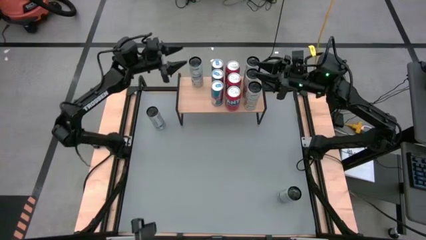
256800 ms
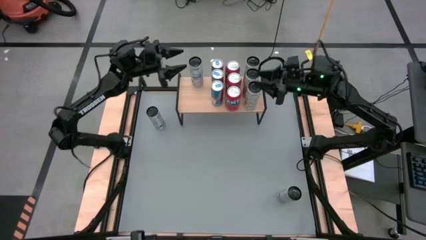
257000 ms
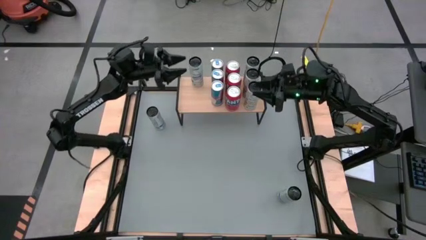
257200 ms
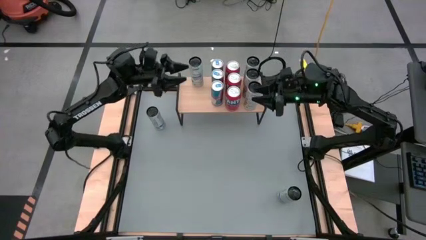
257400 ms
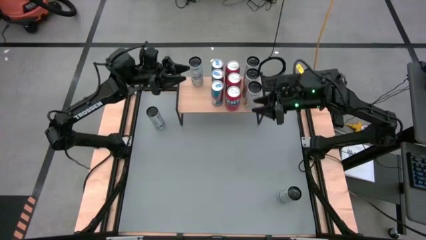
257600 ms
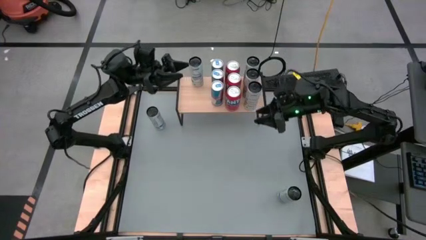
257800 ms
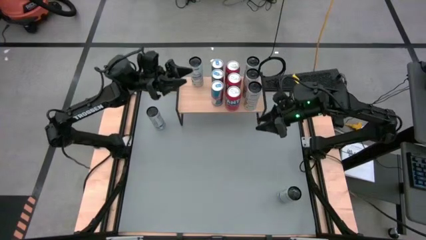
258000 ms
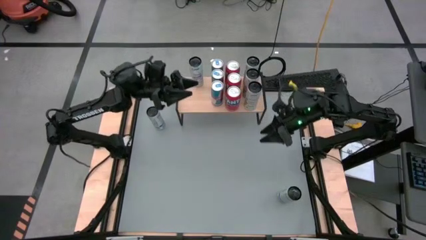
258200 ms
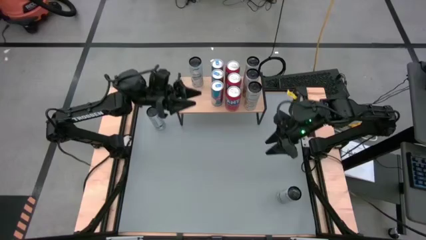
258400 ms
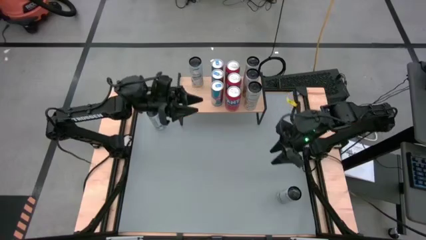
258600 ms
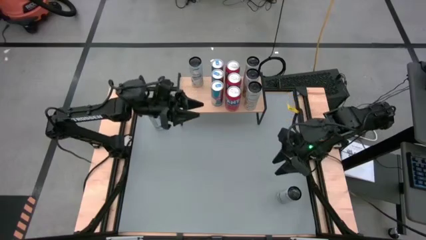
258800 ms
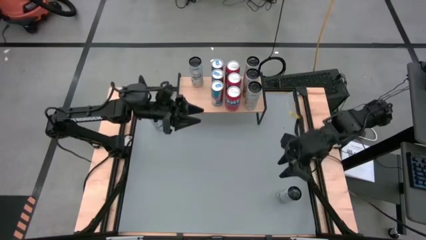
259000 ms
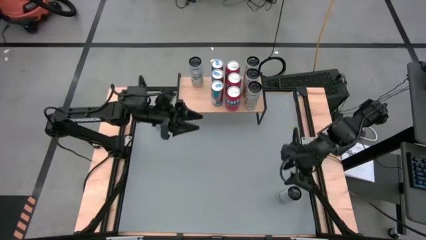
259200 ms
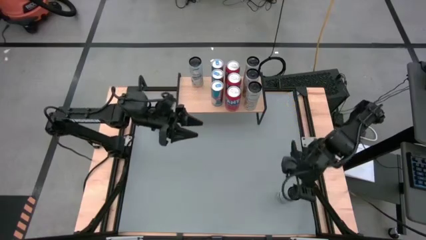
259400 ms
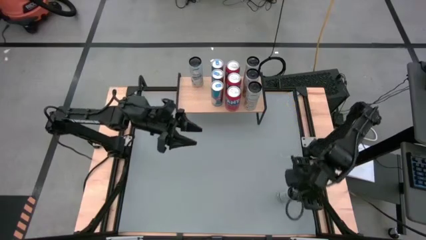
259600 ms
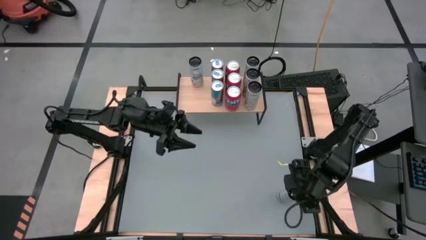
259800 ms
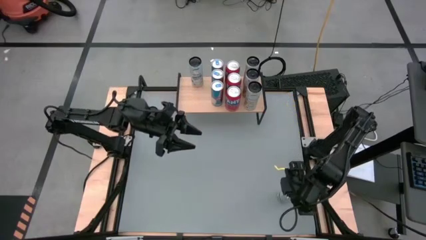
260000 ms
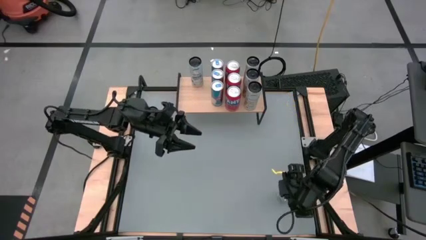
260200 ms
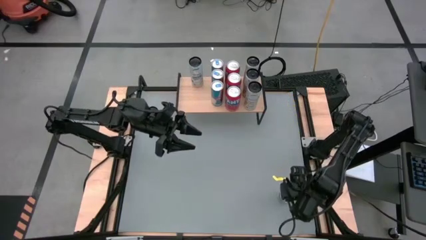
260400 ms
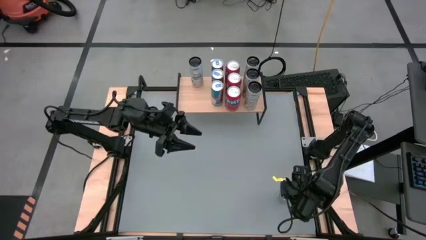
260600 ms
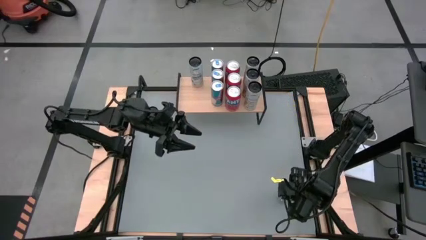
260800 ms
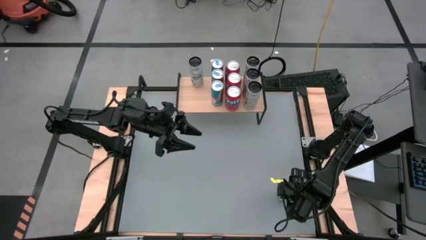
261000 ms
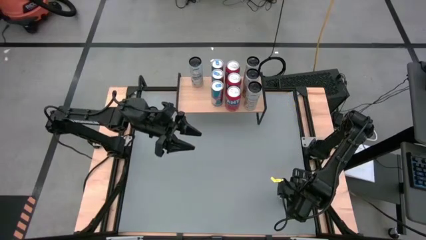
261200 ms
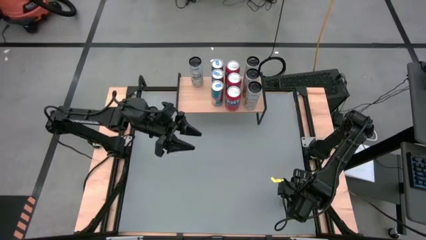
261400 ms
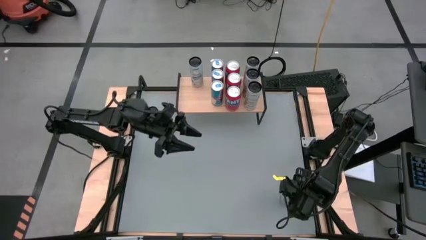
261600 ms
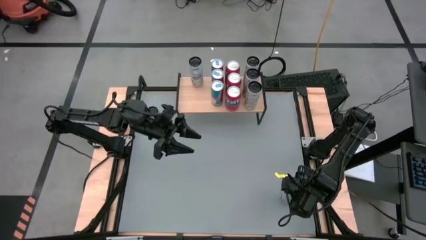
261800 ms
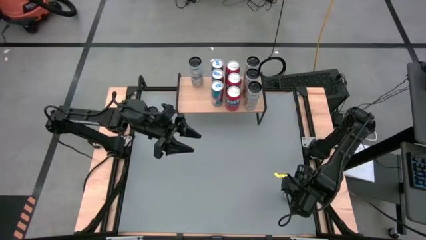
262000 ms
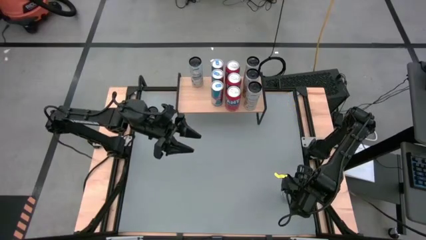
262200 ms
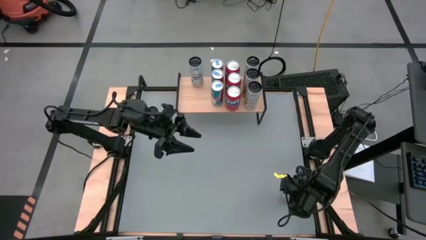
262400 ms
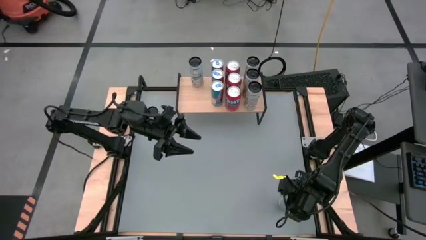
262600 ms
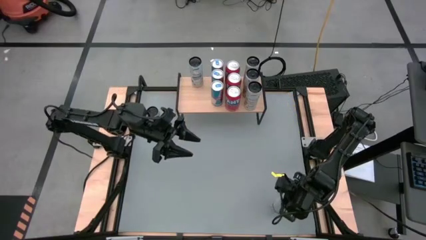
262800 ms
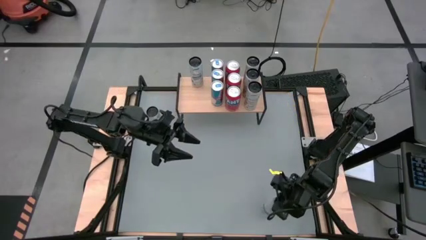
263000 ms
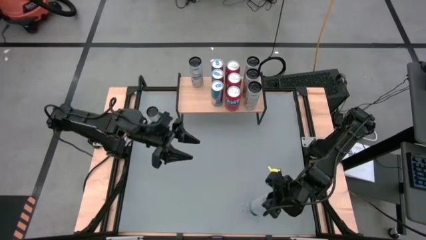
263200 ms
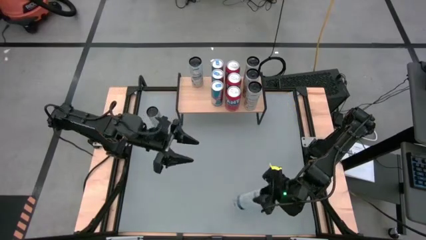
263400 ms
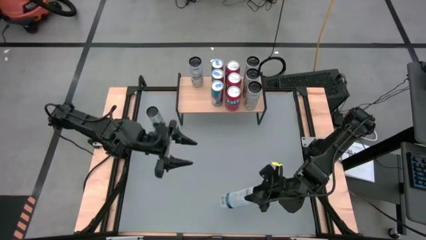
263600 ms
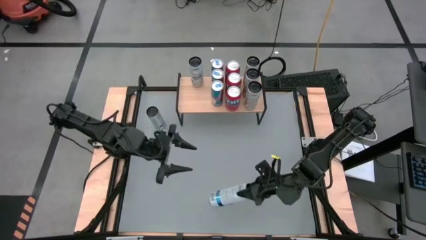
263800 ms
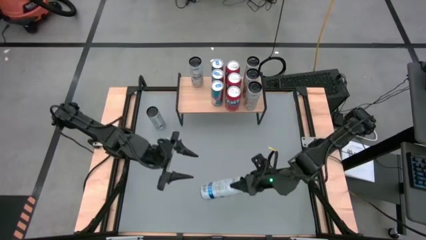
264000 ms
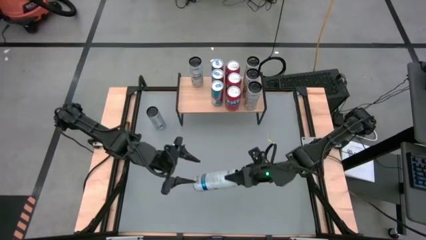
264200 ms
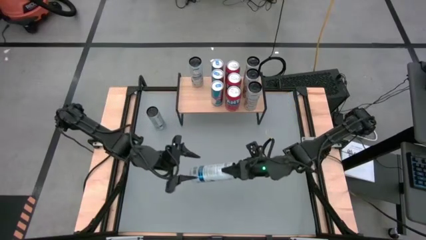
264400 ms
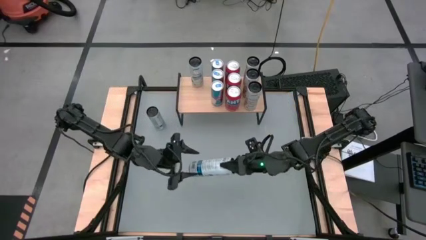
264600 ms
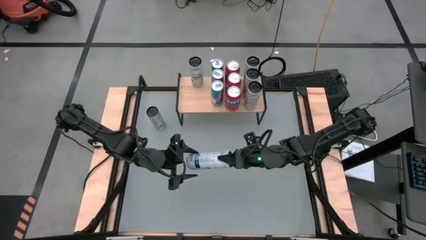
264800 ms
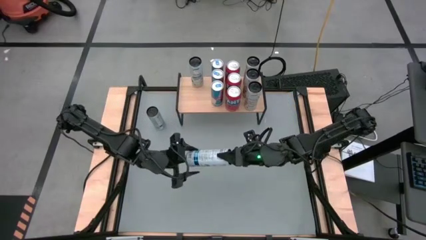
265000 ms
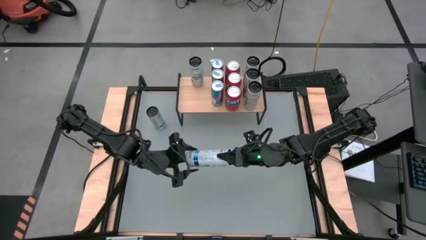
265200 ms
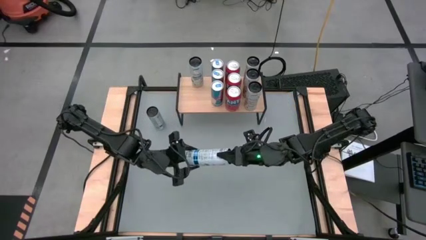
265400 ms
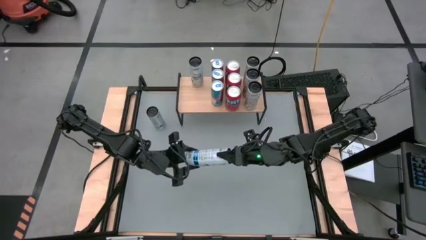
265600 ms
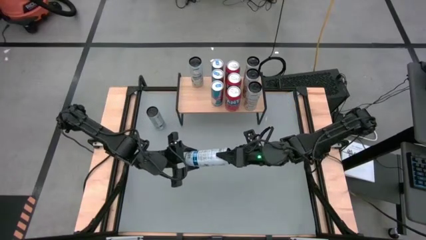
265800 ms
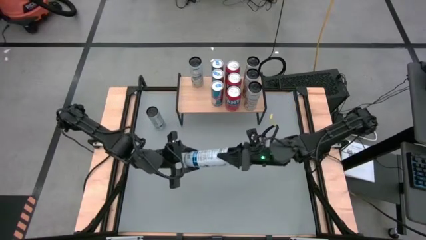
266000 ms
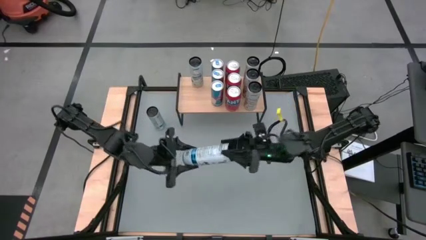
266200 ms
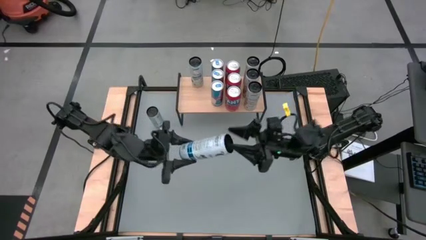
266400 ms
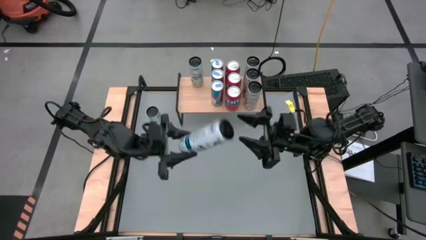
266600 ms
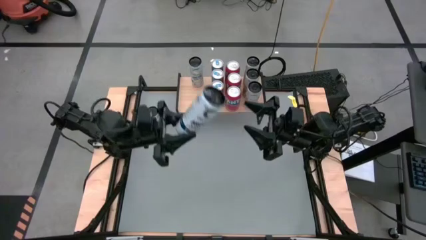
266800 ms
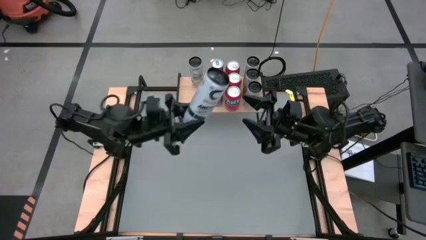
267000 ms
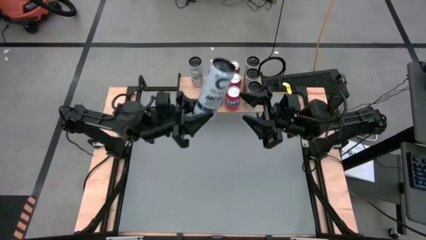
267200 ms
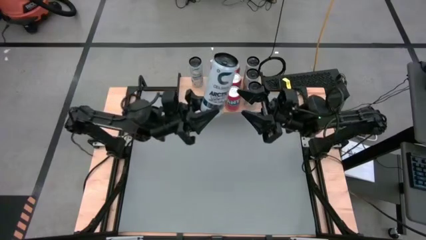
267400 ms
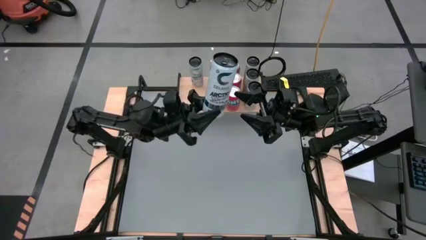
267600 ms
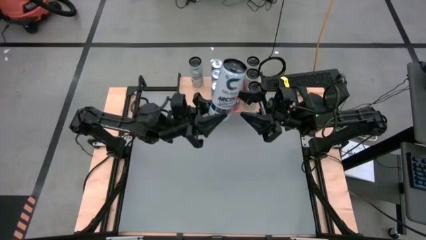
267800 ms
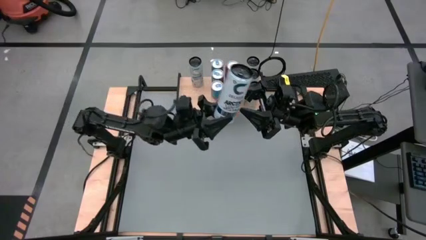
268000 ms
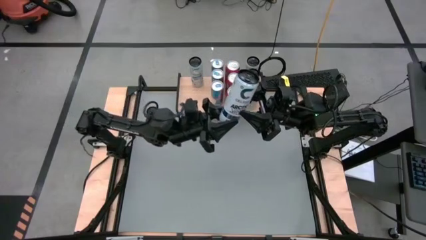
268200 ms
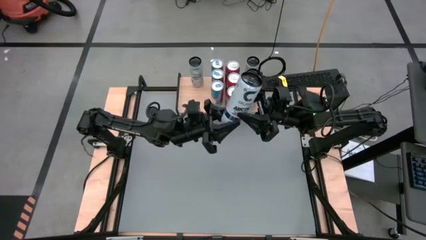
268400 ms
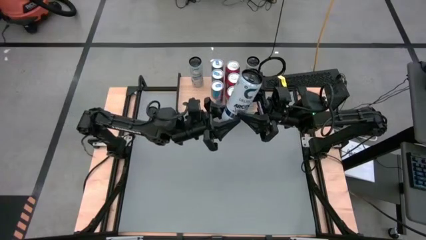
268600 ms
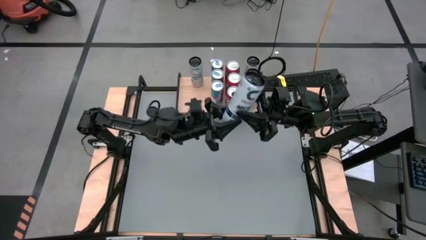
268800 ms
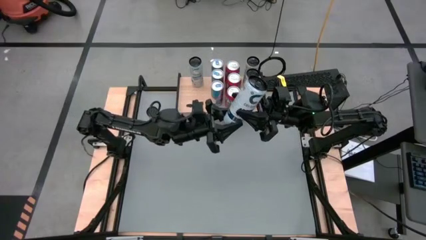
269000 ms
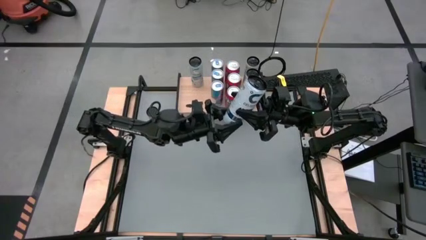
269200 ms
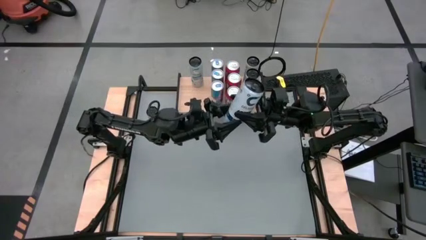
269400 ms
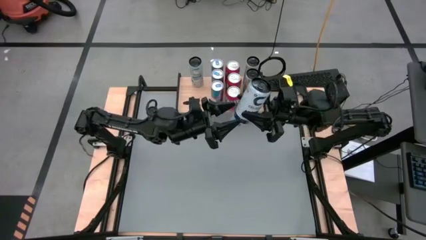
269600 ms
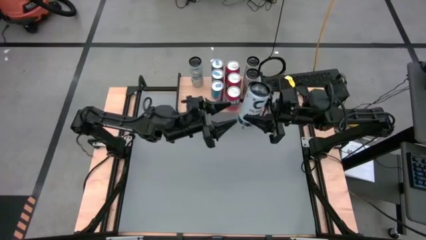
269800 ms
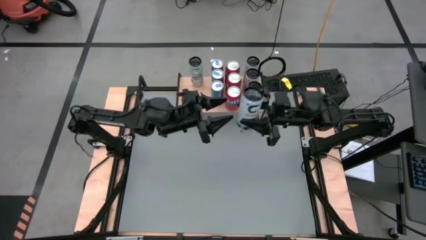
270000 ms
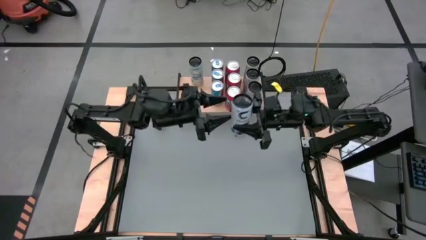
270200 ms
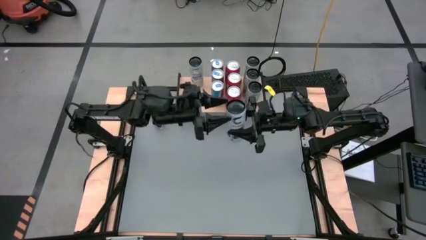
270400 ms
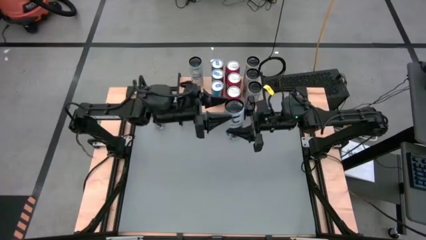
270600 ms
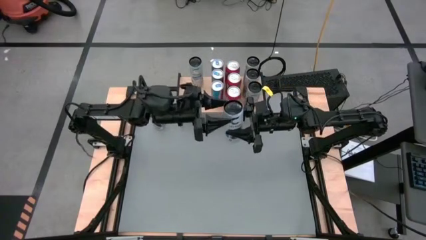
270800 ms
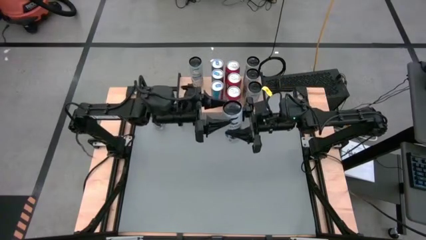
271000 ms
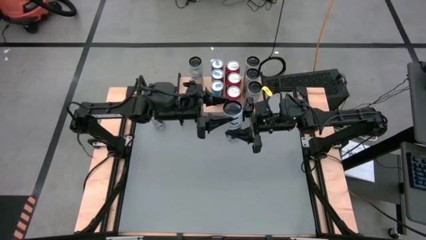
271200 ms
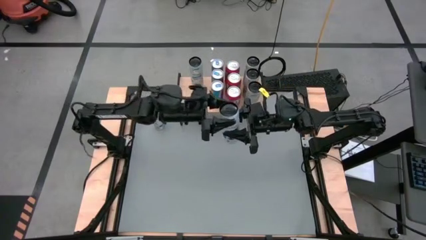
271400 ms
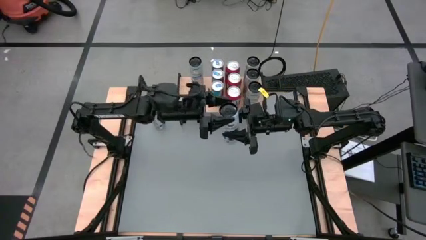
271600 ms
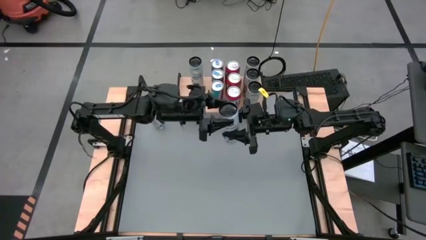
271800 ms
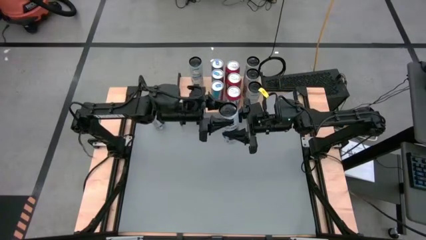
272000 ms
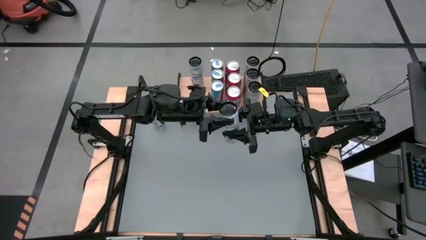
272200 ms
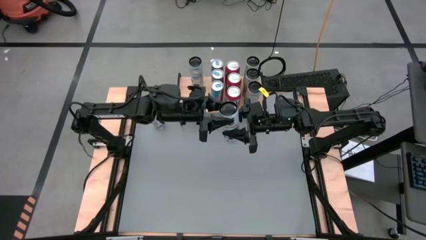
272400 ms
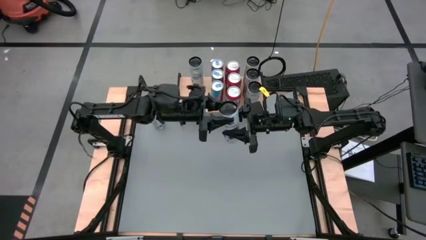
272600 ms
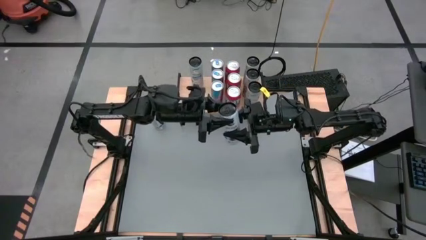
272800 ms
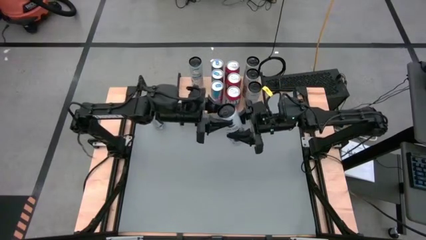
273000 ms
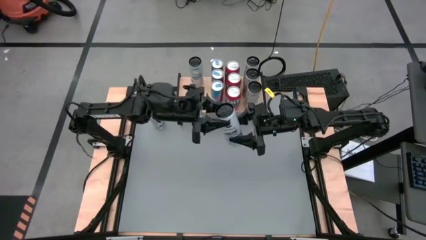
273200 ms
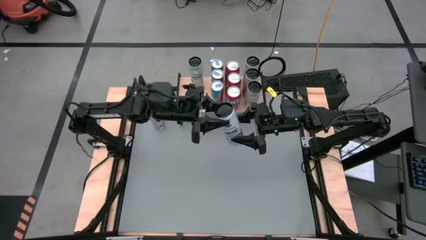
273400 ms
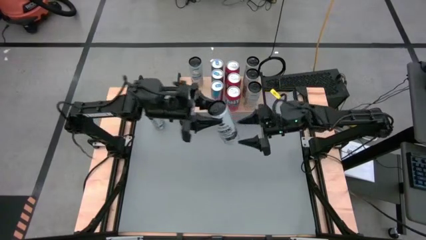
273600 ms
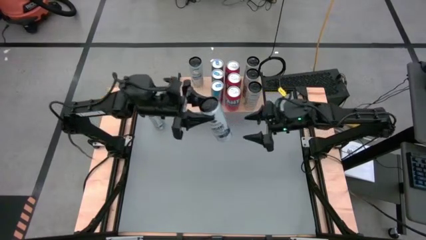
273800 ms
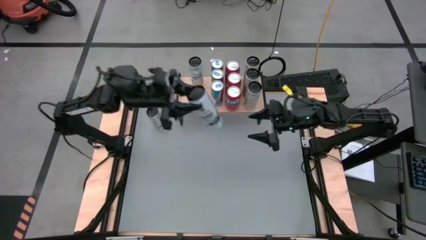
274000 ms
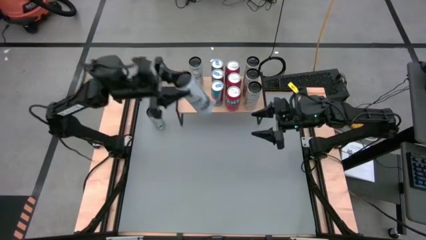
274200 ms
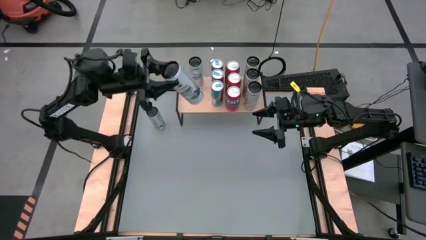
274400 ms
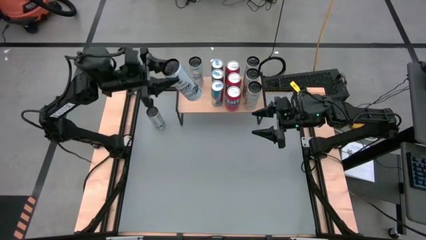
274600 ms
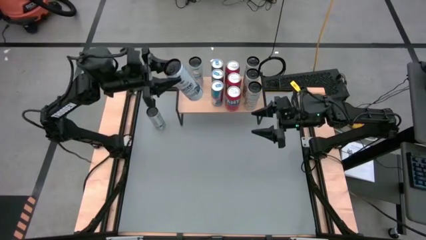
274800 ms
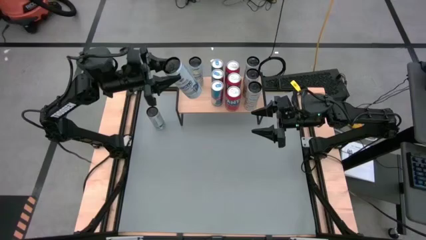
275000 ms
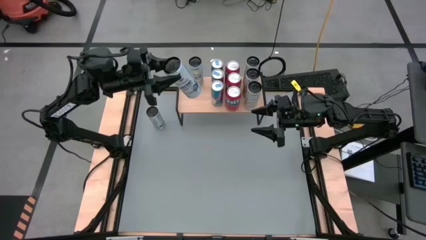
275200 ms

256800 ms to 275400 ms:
Task: Place canned beverage on shelf
Put the bottom white soda can on the shelf aligned with the other white soda can
